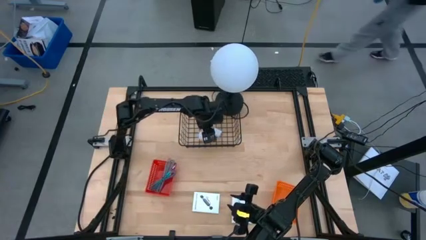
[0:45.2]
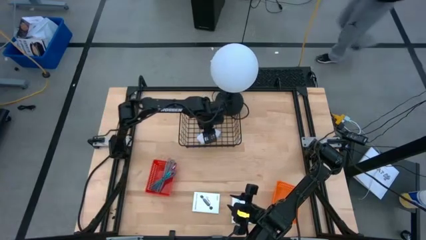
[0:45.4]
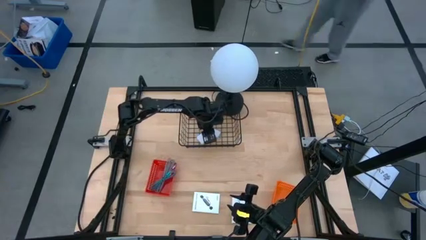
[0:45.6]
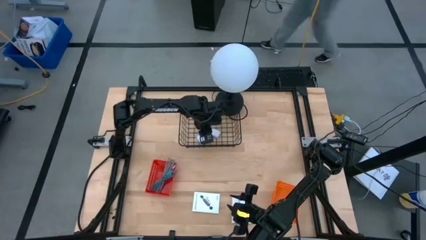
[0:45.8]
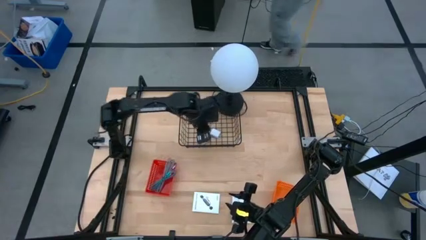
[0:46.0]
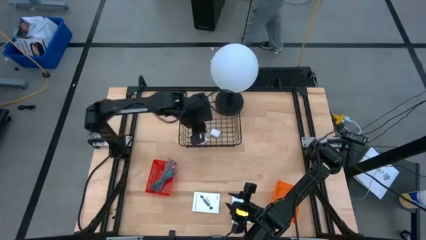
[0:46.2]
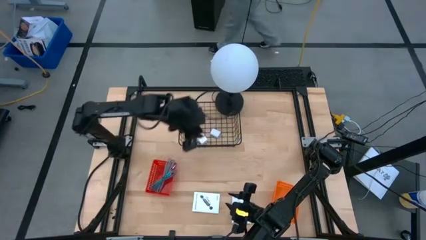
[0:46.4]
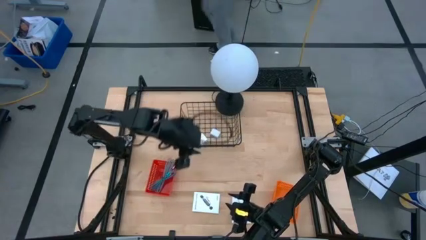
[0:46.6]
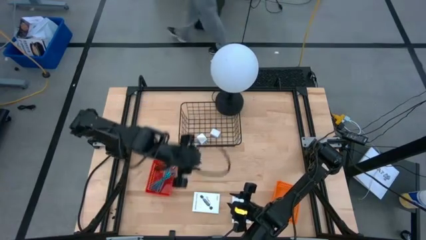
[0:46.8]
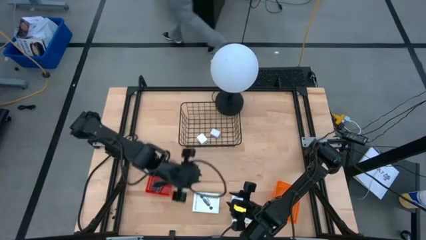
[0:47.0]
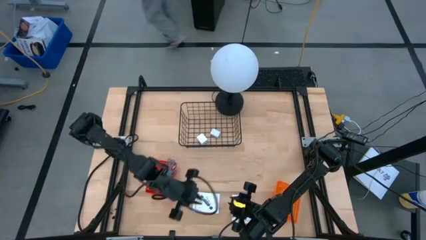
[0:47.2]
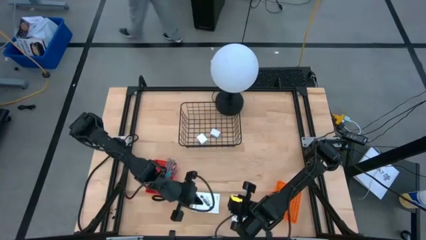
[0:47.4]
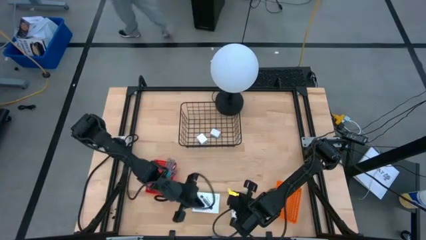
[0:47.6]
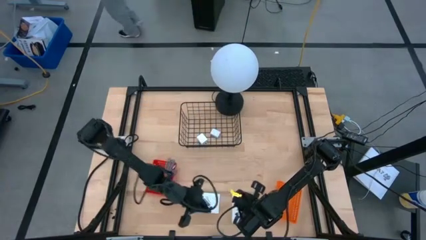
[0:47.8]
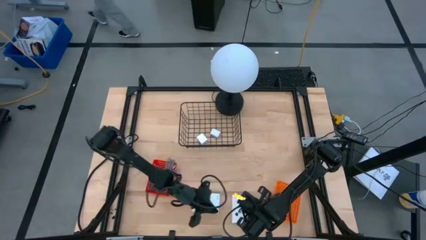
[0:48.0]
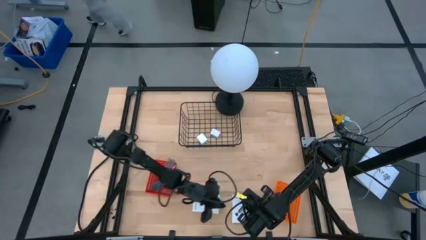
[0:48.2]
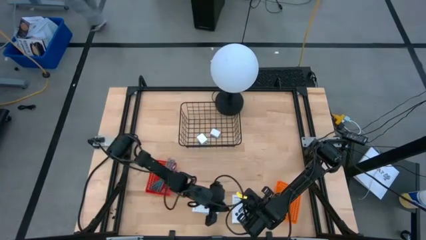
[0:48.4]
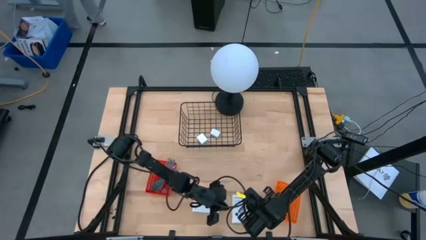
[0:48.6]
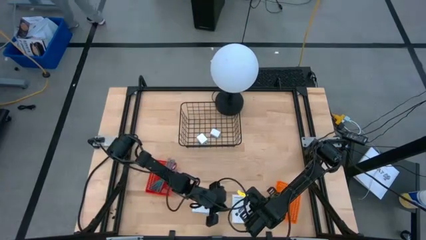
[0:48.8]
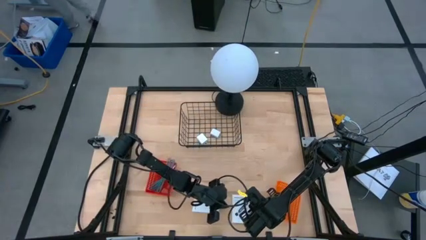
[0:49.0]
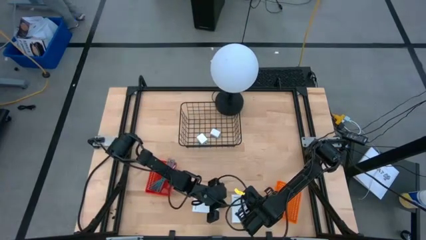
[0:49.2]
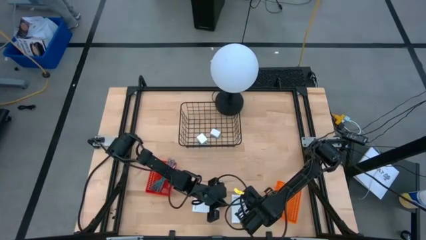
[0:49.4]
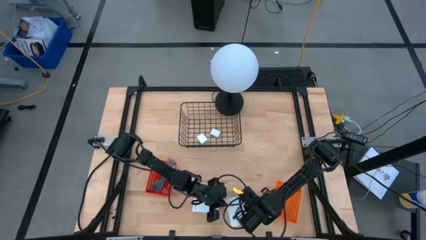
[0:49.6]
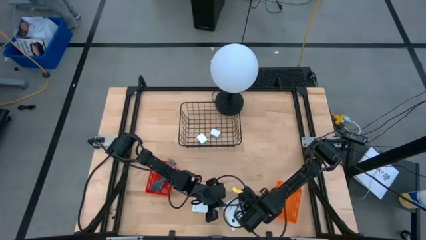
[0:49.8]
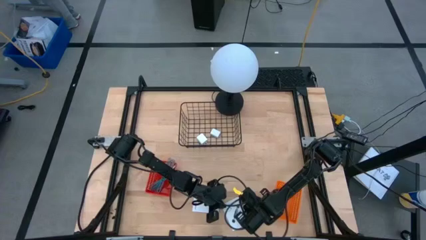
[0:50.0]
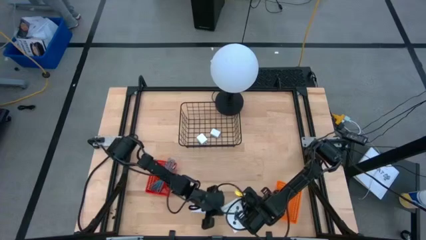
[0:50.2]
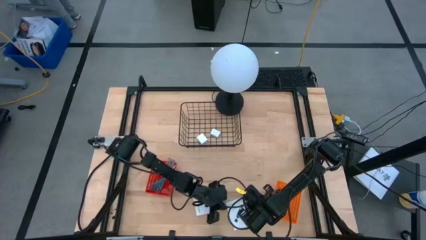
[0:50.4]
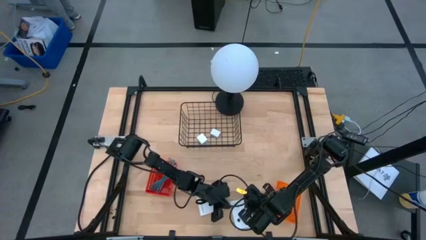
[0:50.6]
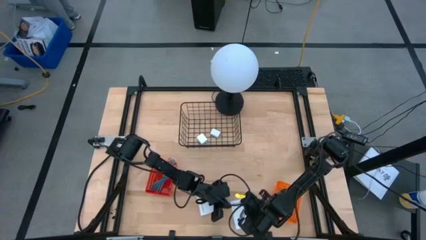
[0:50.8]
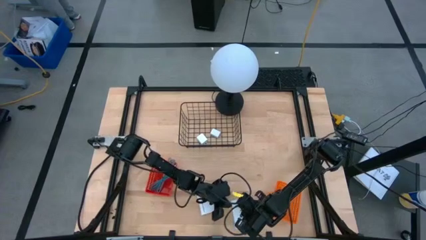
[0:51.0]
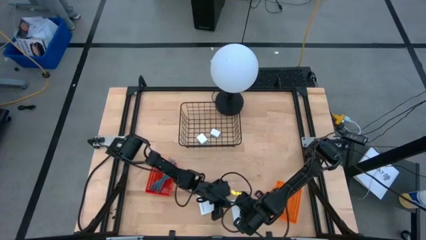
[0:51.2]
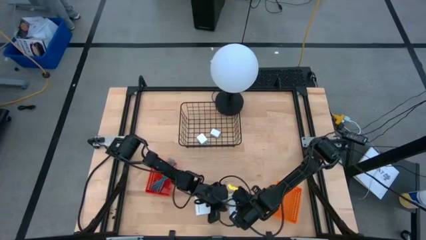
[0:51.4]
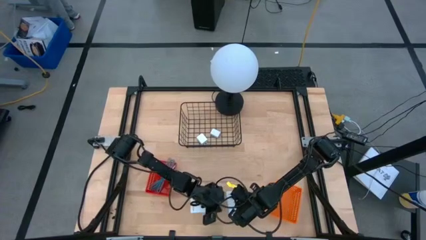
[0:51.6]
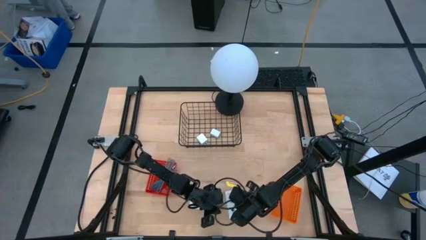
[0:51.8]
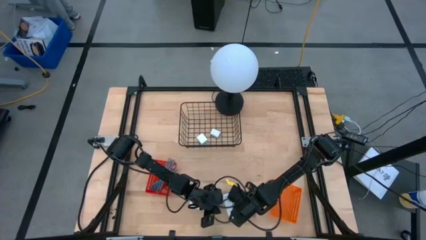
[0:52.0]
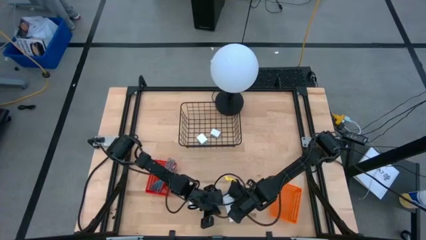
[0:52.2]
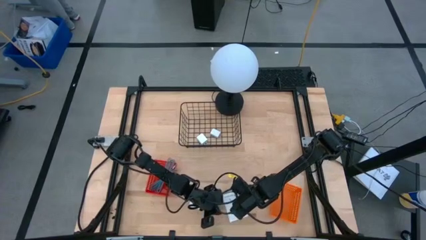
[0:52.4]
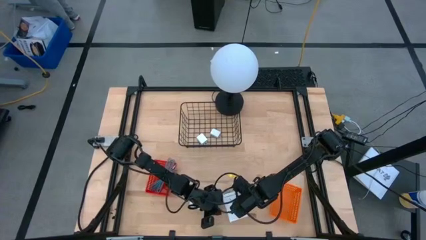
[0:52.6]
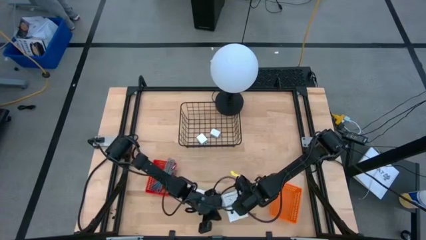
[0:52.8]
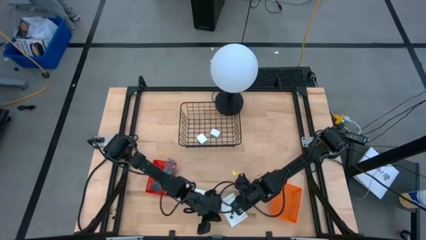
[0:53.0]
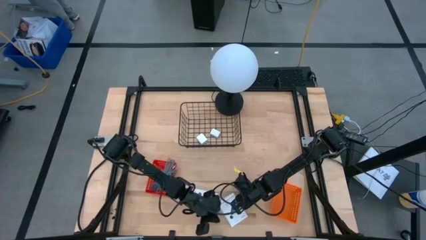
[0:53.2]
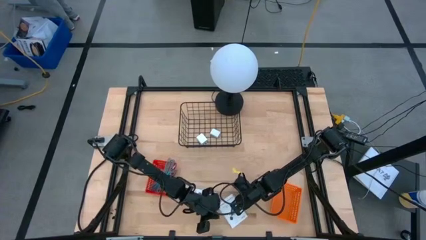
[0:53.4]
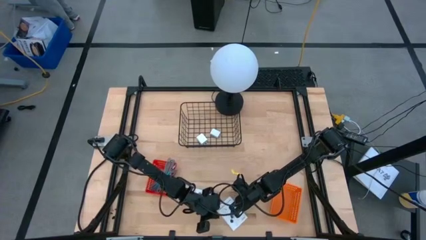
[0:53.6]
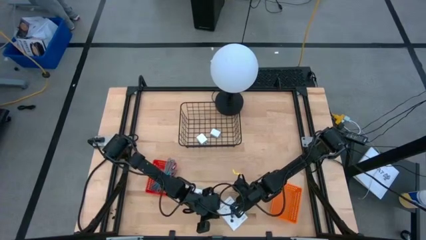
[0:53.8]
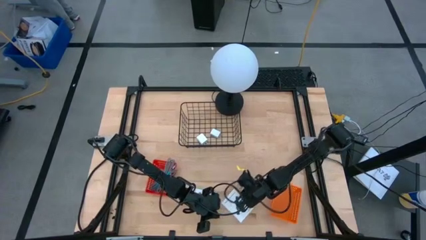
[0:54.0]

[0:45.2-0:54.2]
Task: Pick and place items into bin
Put the right white card reader box into the orange basket

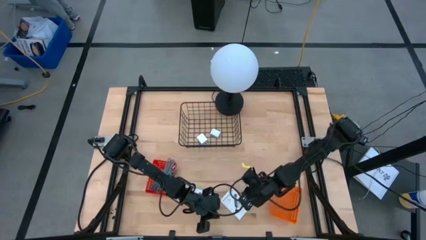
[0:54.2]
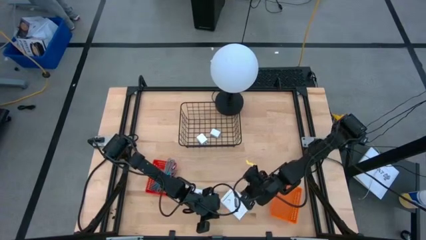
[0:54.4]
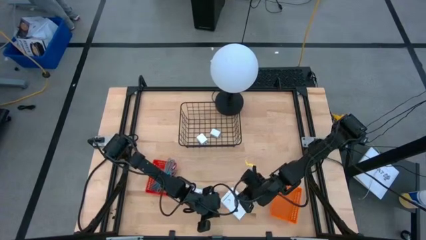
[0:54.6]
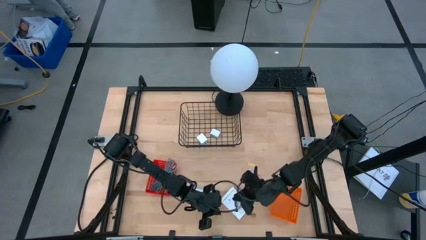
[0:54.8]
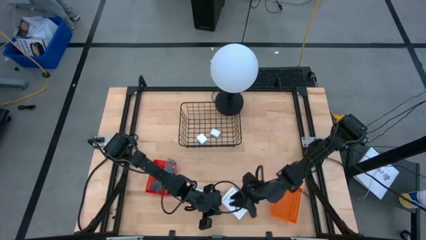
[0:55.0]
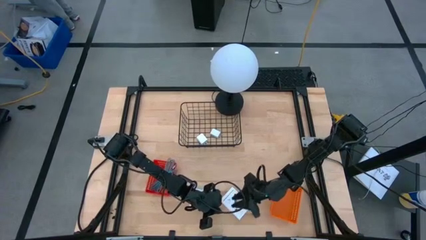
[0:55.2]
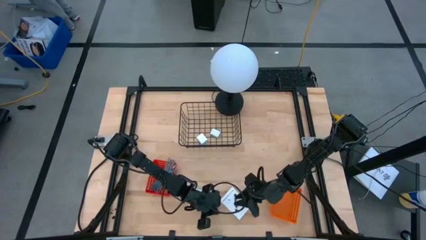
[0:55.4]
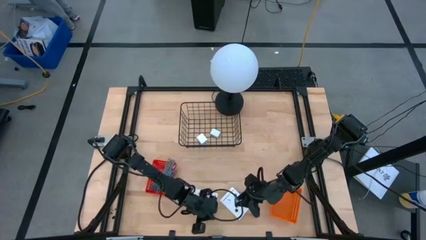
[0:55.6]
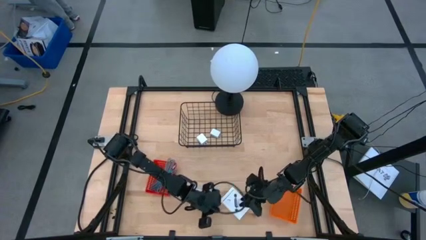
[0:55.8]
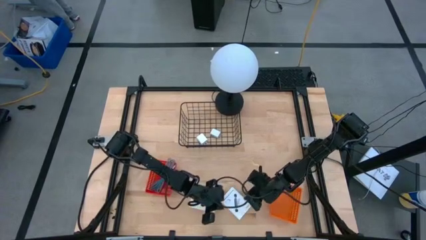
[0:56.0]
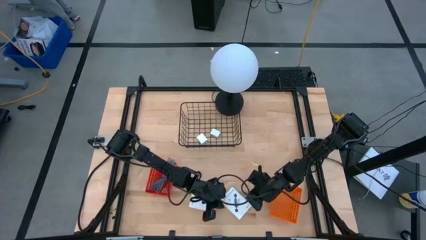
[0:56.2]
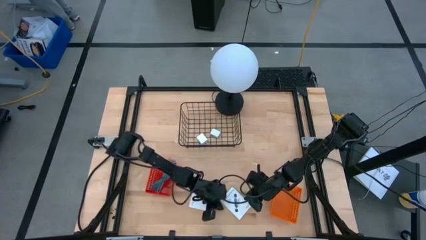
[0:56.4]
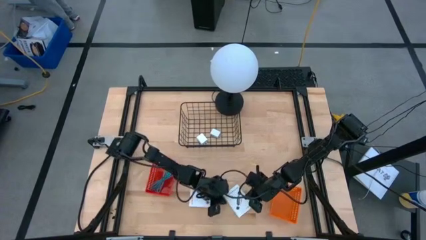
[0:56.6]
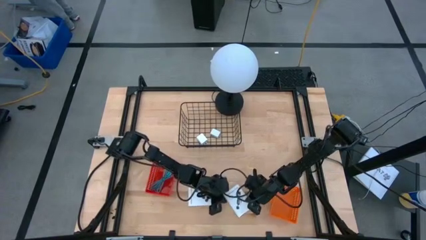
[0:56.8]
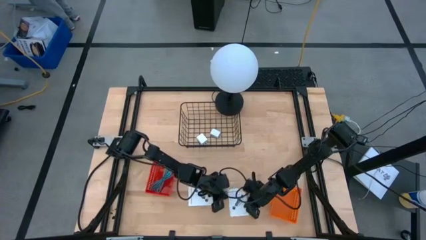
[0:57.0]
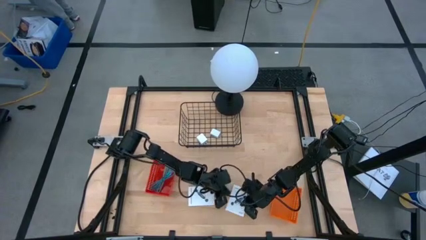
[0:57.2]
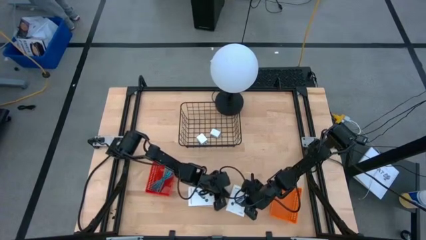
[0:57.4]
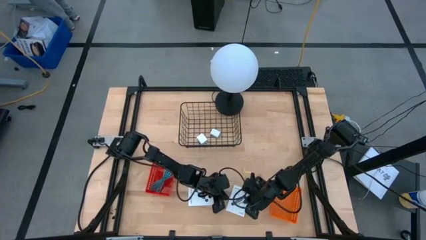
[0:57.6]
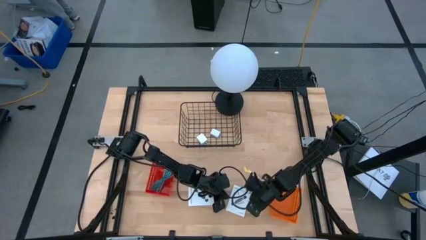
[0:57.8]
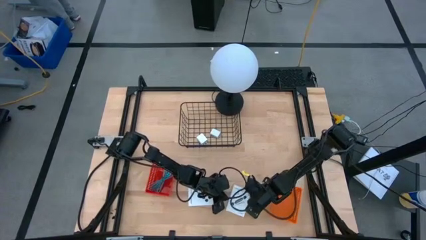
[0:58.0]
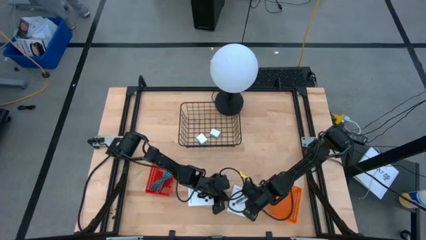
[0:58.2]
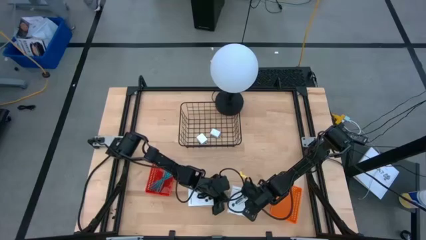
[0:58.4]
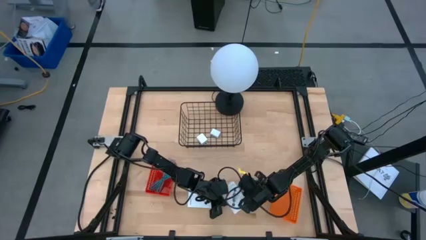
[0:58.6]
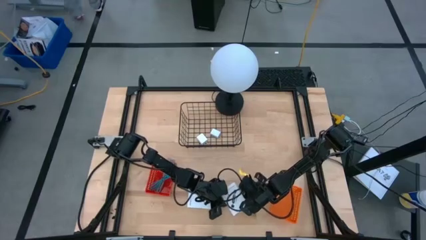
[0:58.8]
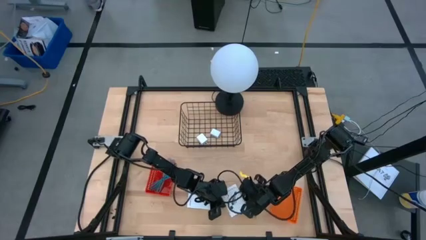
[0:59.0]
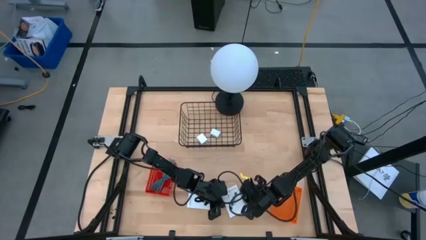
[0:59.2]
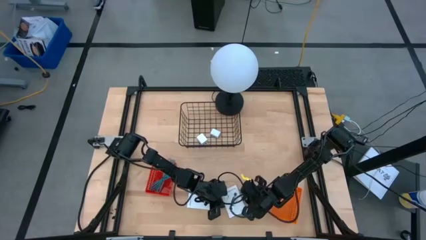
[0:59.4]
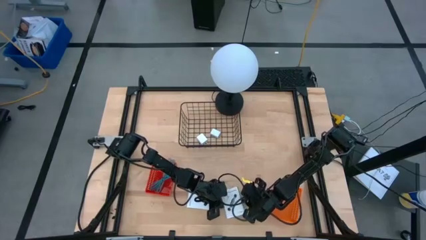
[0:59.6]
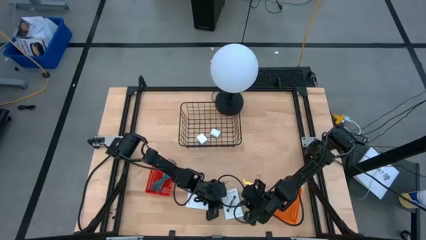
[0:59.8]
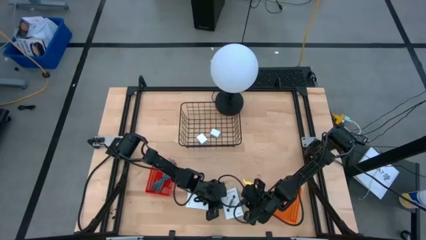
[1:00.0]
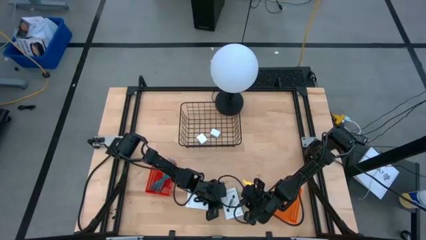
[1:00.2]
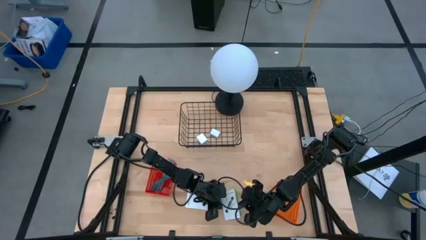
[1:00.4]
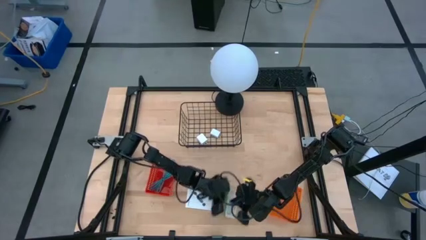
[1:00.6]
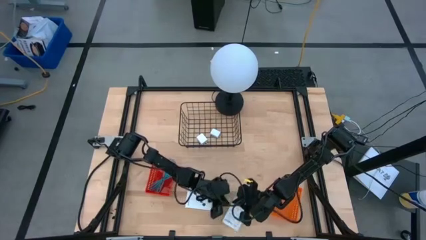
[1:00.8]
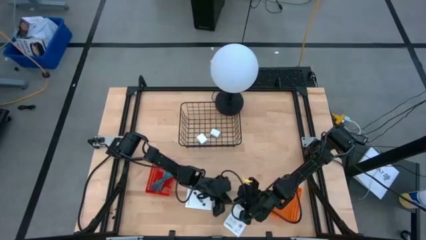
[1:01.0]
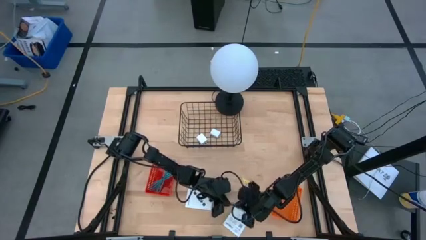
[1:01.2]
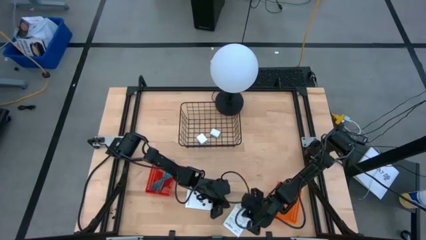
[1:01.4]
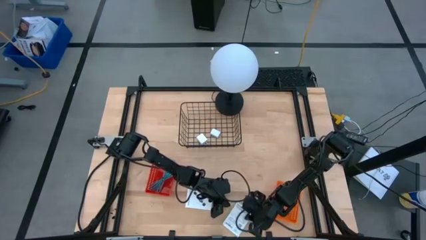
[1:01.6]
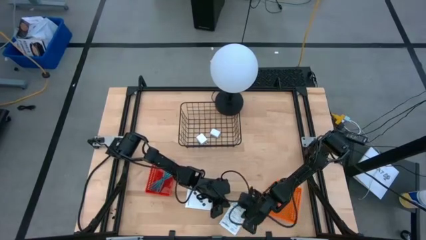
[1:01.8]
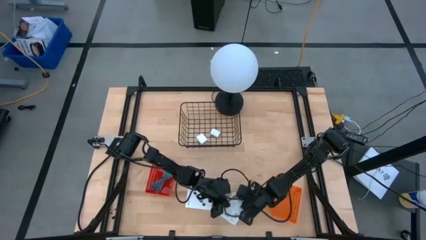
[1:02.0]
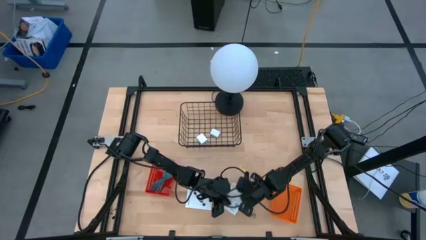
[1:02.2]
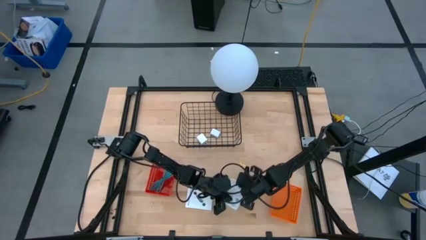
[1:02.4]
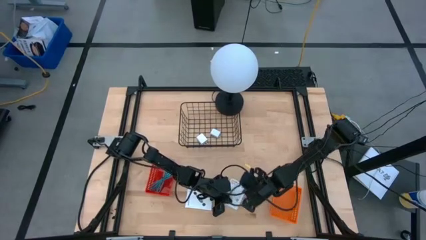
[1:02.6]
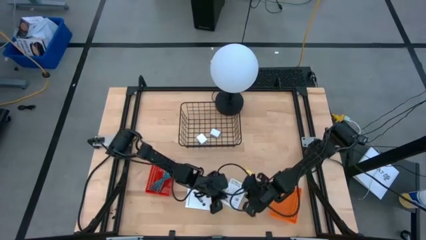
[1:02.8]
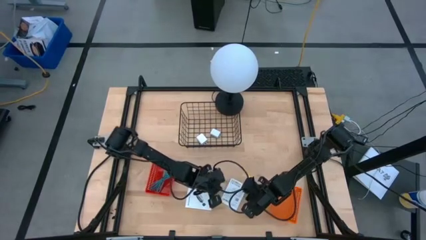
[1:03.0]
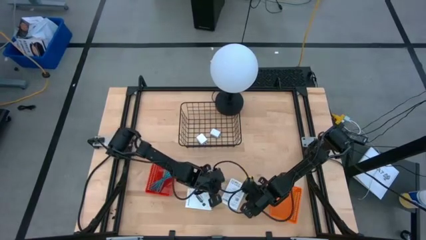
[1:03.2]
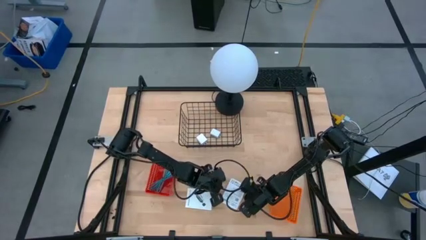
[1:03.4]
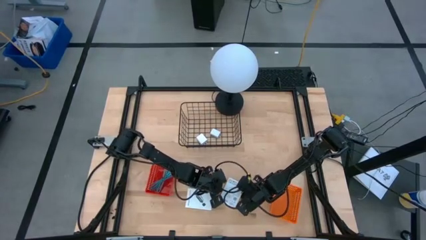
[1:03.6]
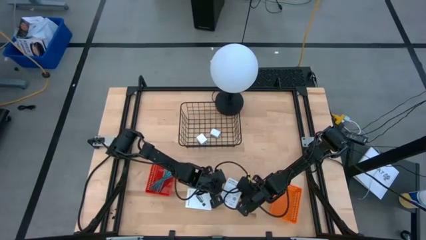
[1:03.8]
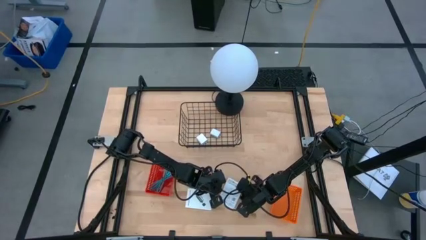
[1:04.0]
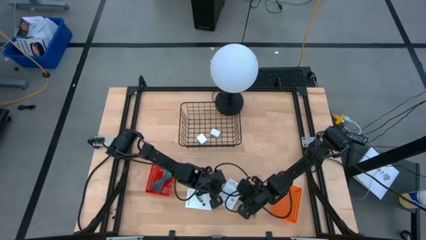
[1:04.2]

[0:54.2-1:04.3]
Put the right white card reader box into the orange basket
